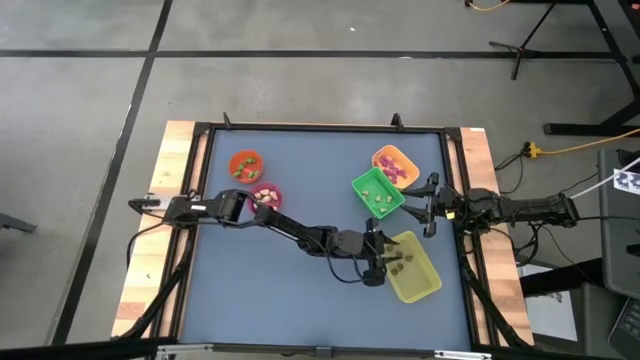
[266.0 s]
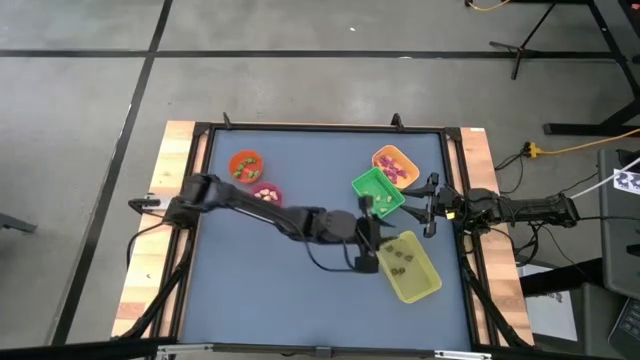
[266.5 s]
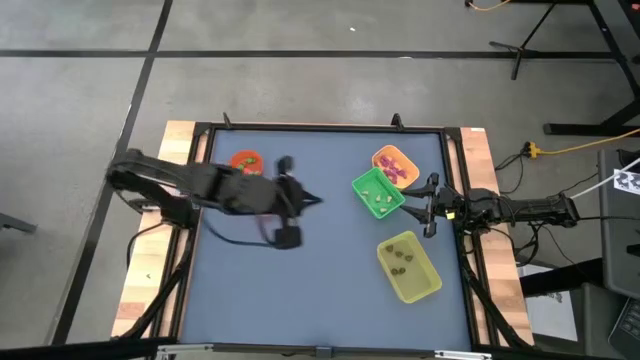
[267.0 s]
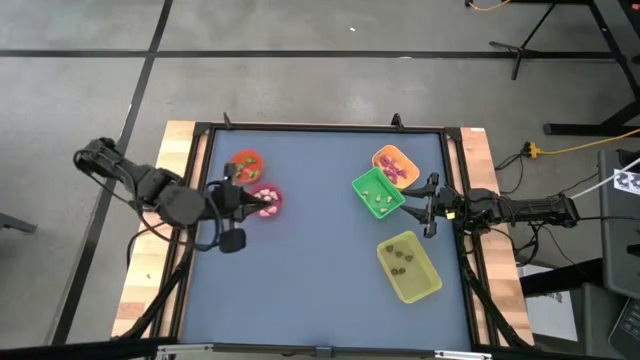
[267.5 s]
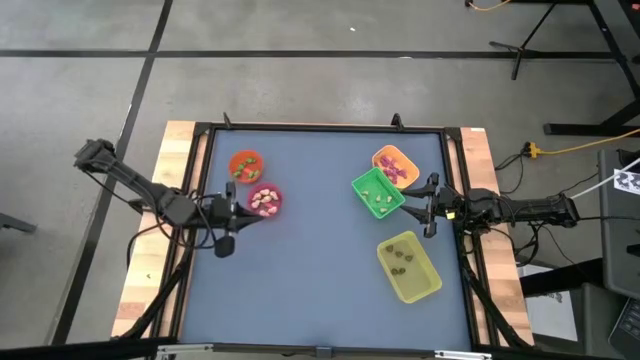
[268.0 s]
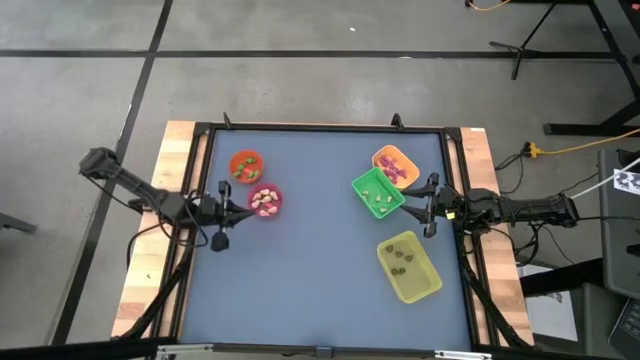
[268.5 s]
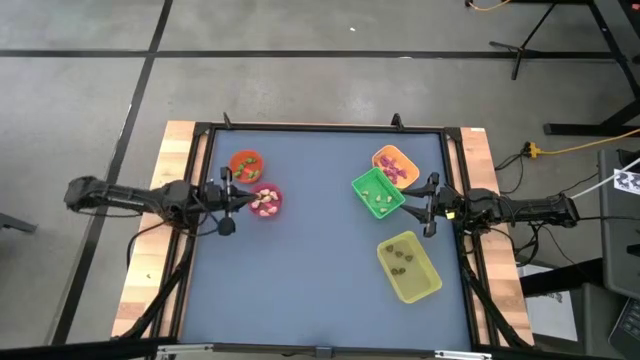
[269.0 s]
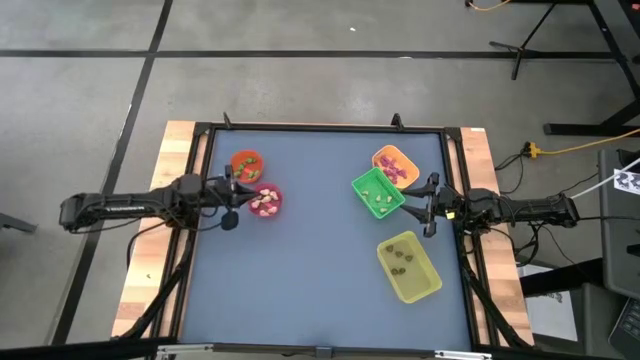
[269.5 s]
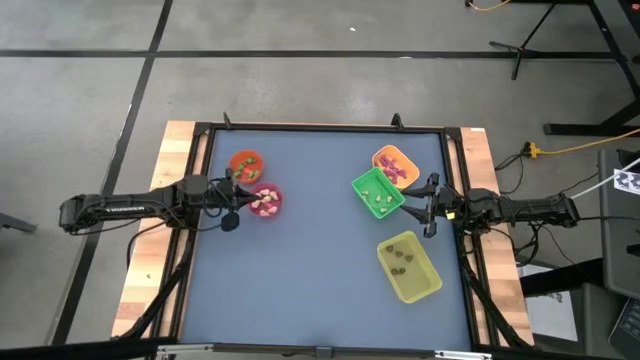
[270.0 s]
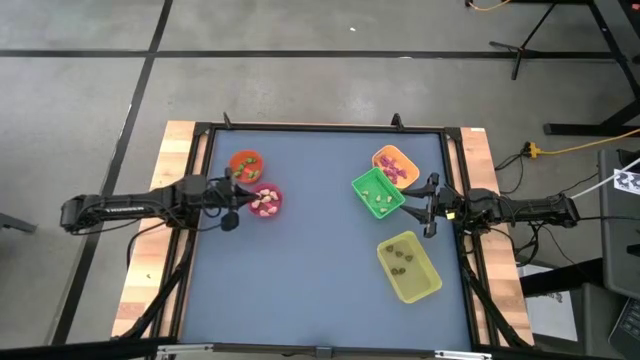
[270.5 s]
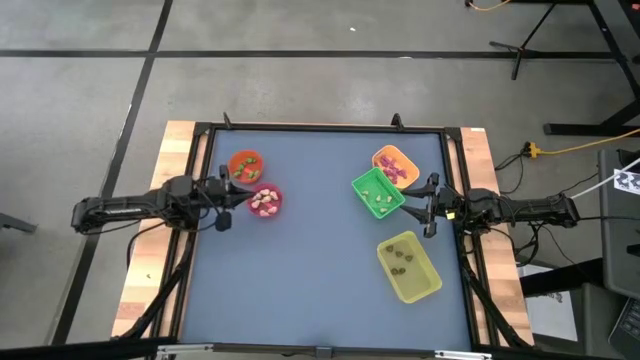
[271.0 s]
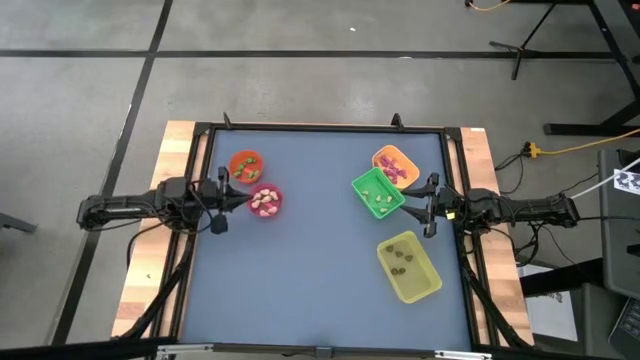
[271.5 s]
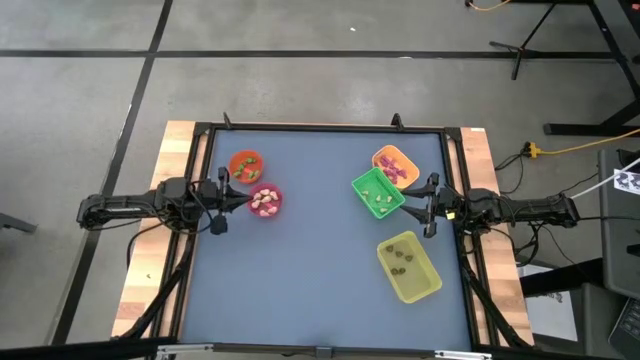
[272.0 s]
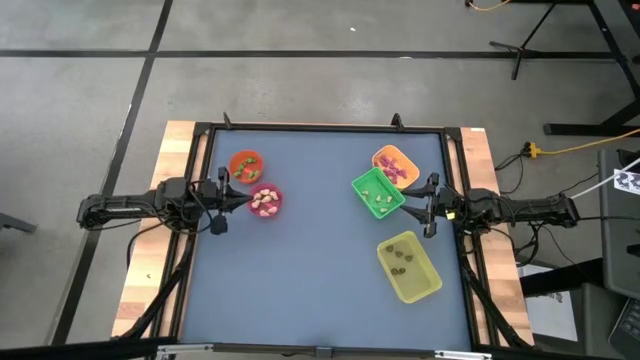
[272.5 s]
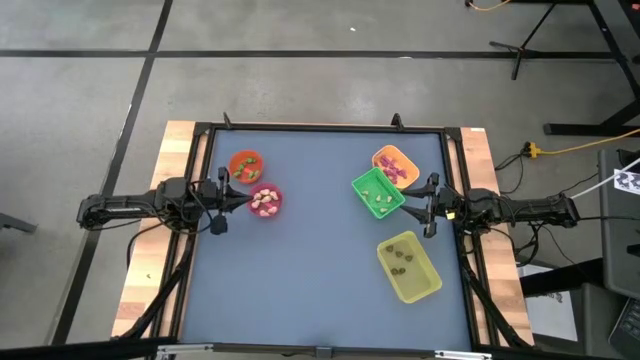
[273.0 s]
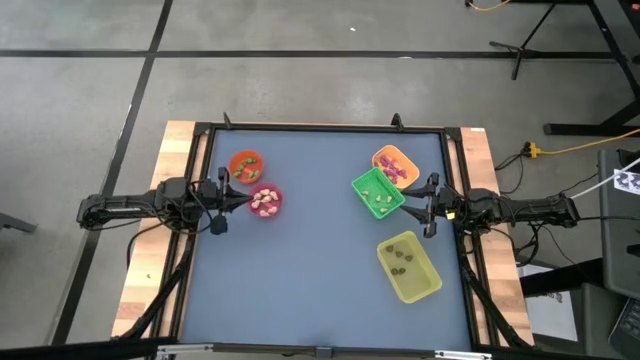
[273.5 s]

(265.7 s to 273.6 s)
Task: Sort Halloween decoration
Return to Home Position

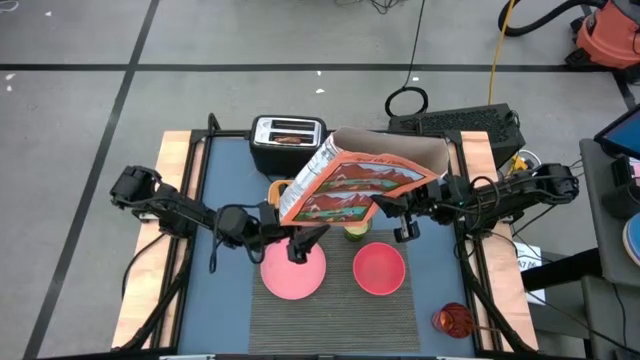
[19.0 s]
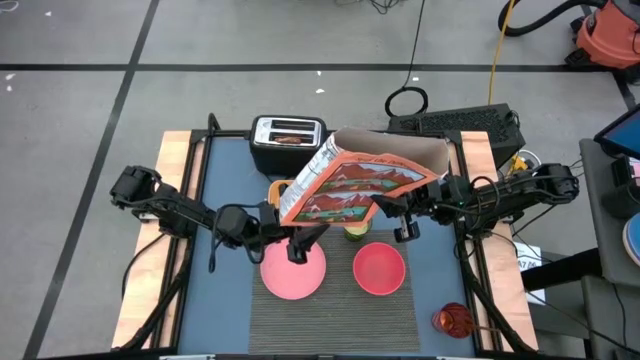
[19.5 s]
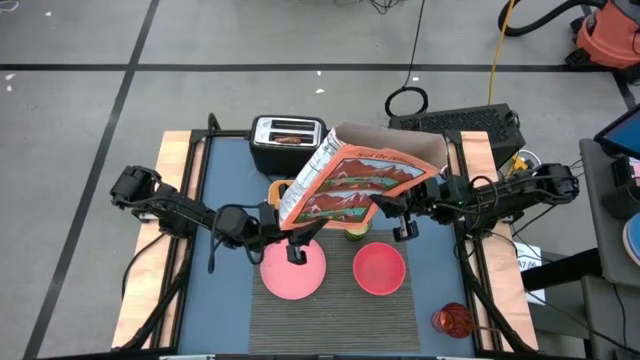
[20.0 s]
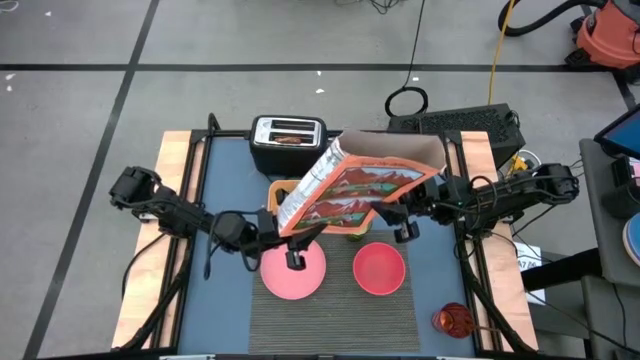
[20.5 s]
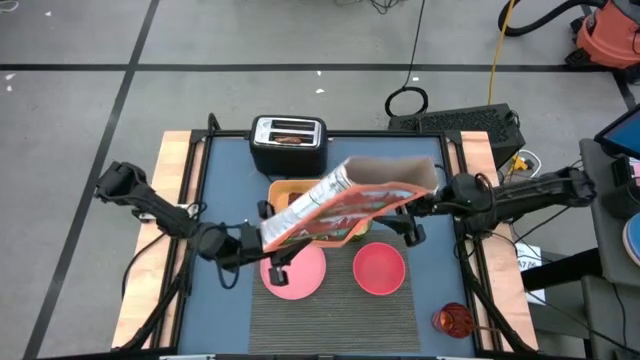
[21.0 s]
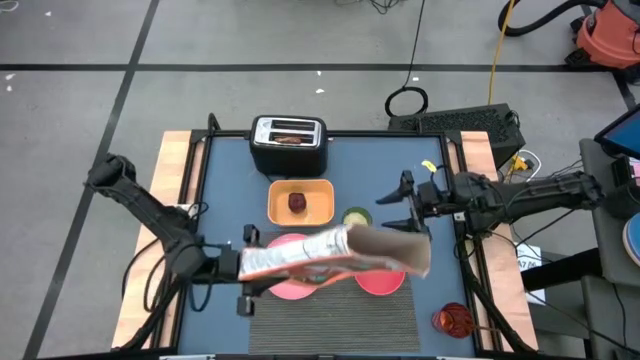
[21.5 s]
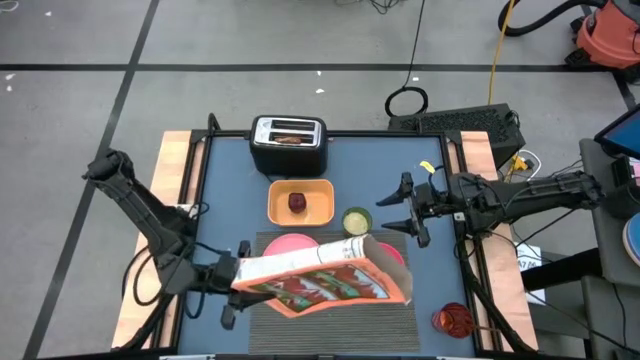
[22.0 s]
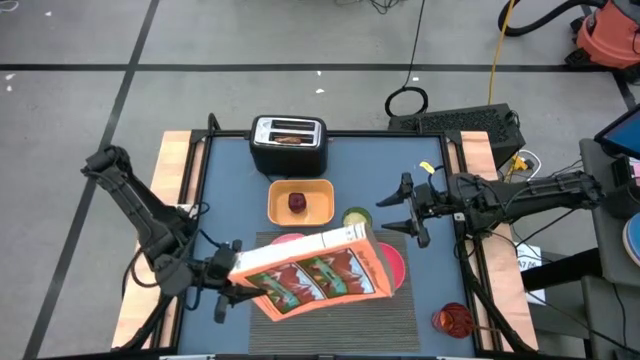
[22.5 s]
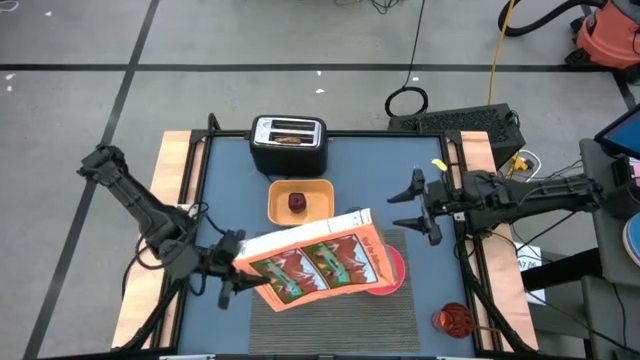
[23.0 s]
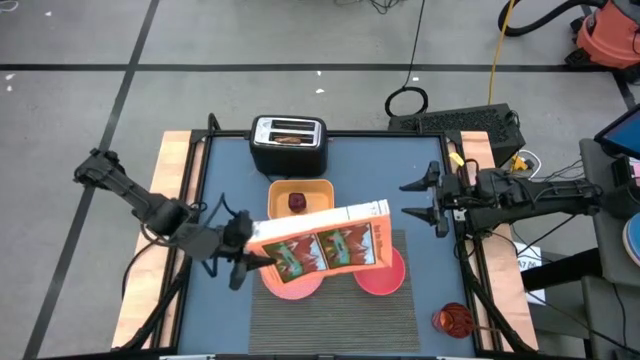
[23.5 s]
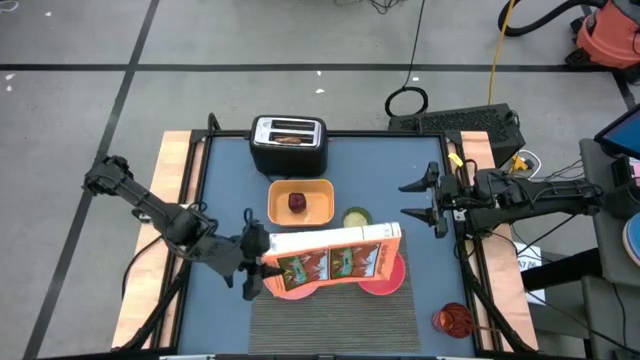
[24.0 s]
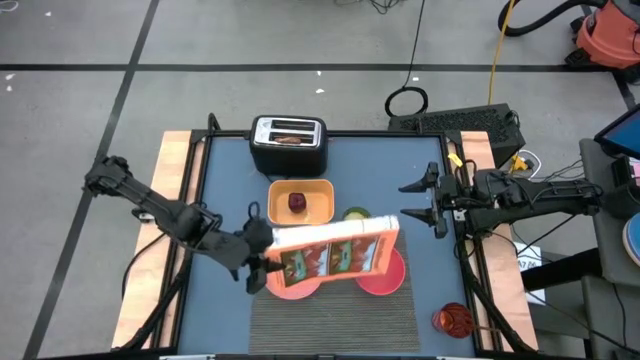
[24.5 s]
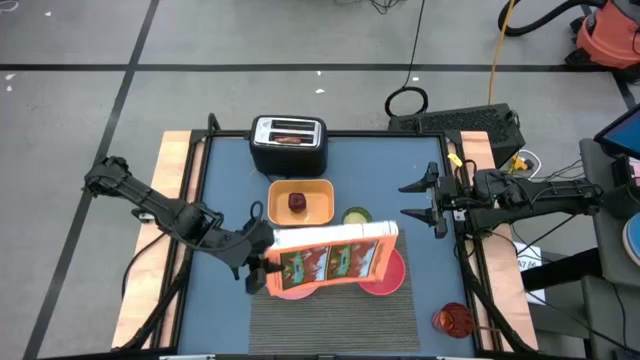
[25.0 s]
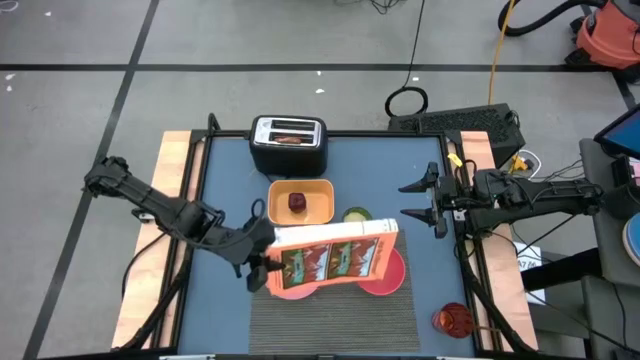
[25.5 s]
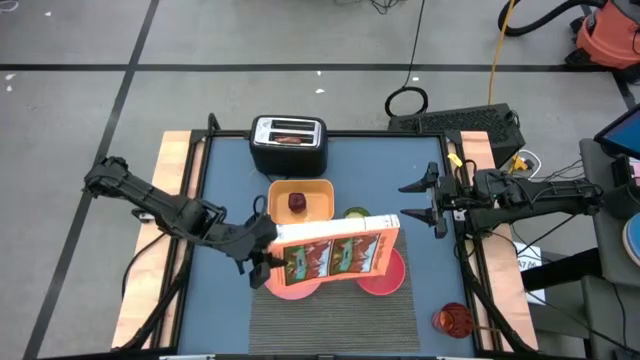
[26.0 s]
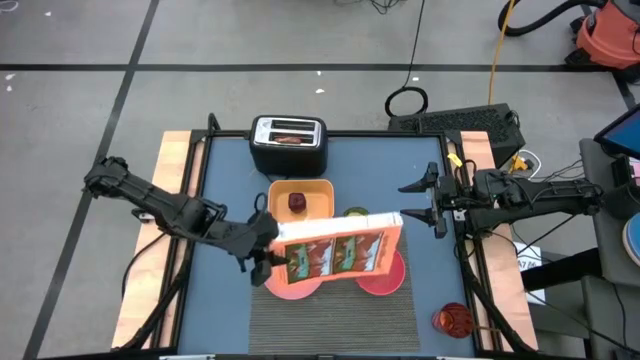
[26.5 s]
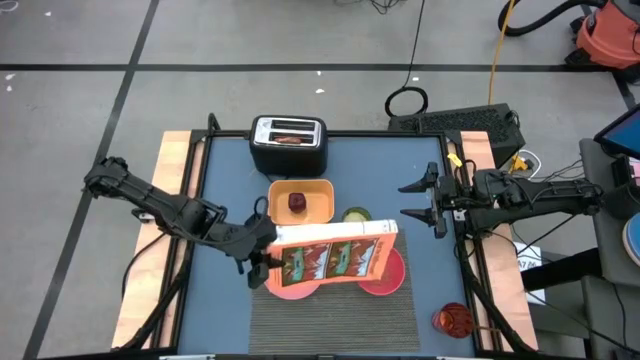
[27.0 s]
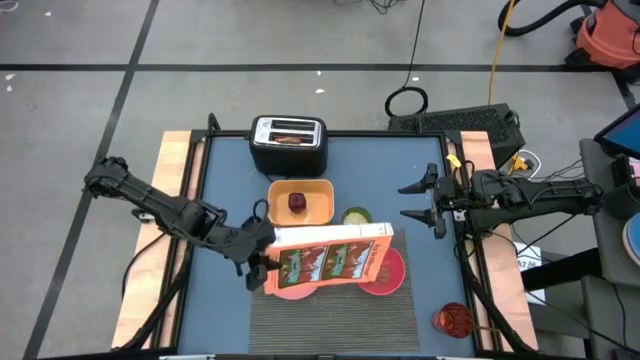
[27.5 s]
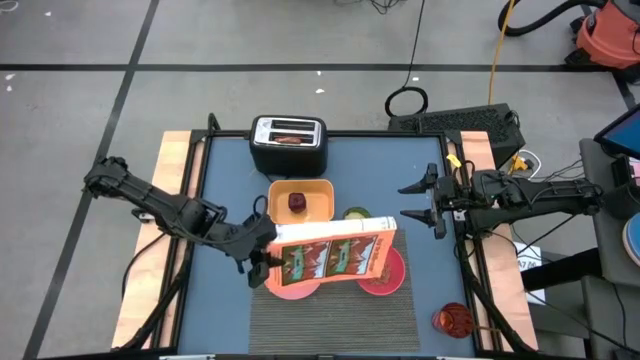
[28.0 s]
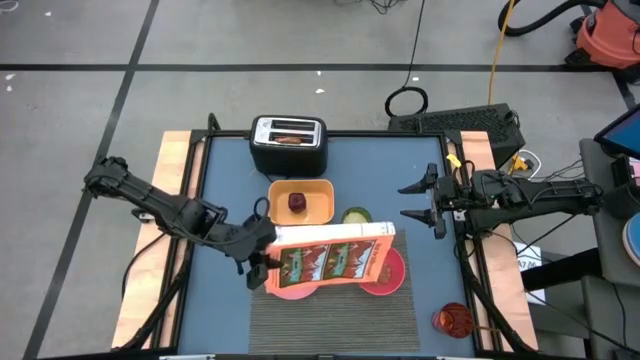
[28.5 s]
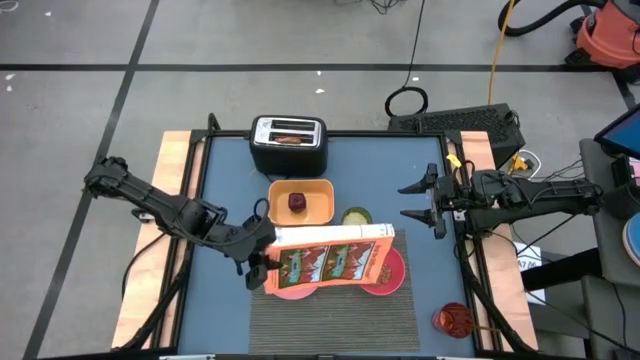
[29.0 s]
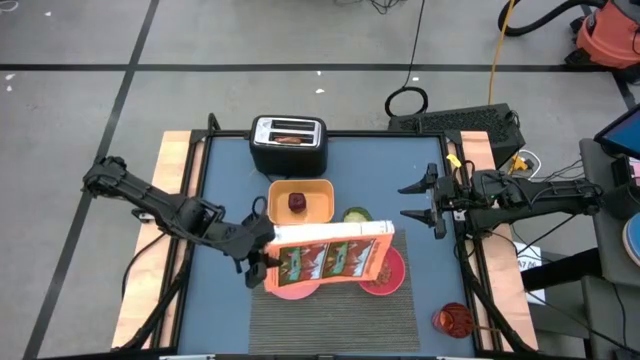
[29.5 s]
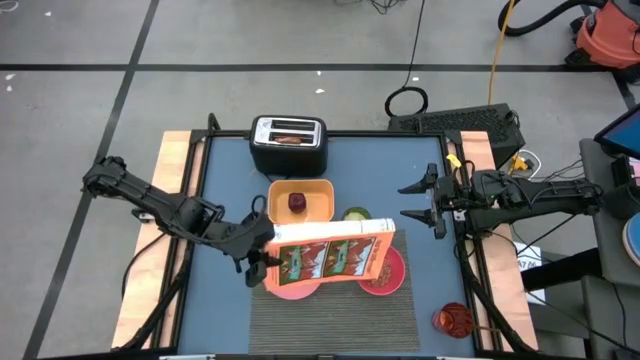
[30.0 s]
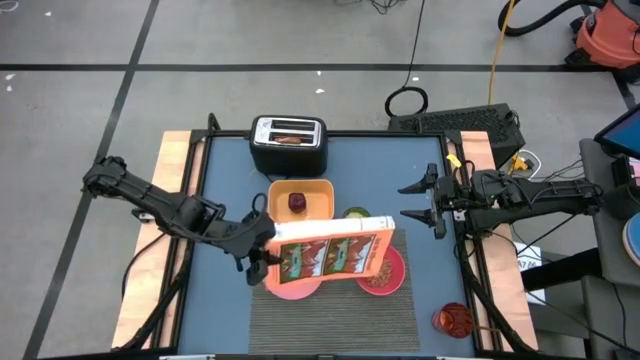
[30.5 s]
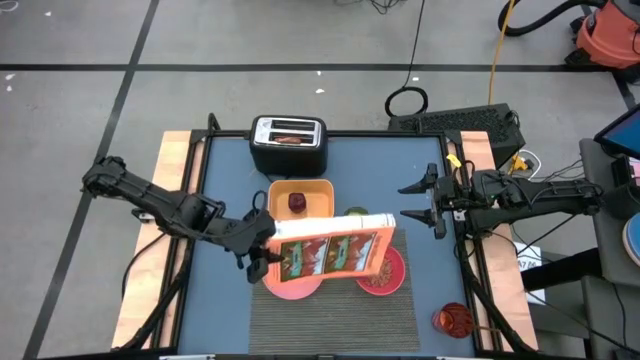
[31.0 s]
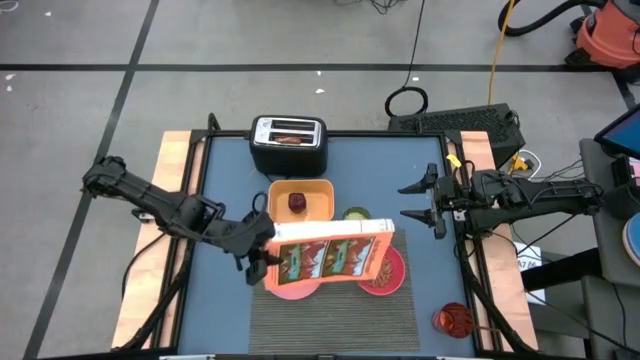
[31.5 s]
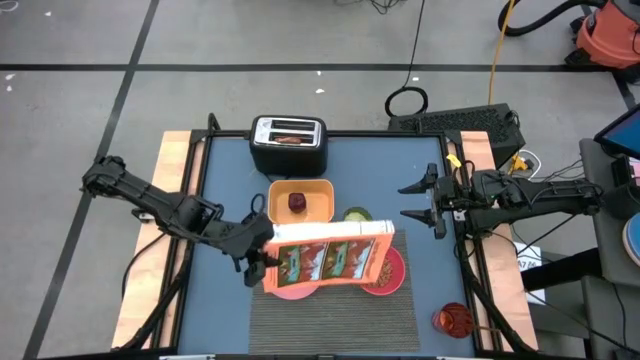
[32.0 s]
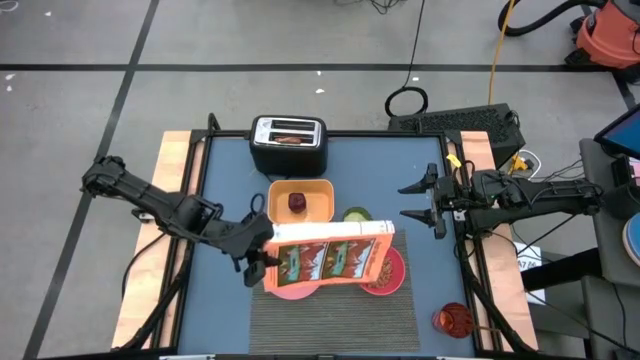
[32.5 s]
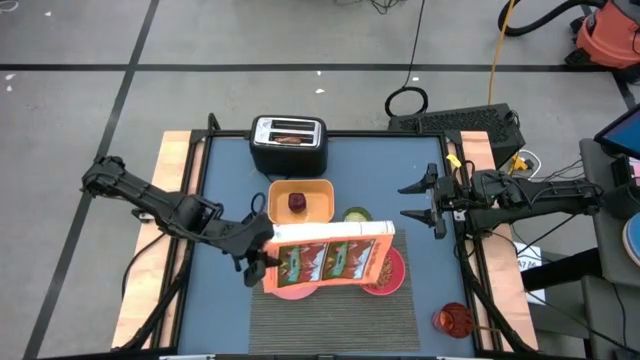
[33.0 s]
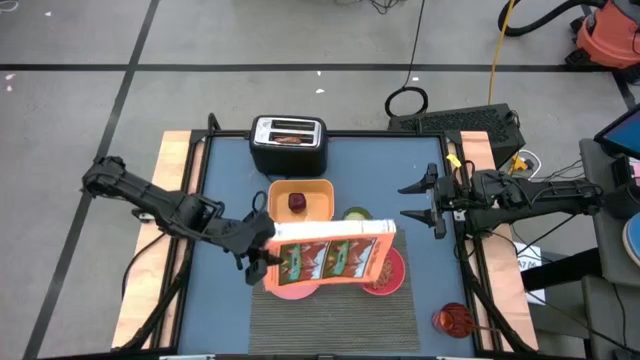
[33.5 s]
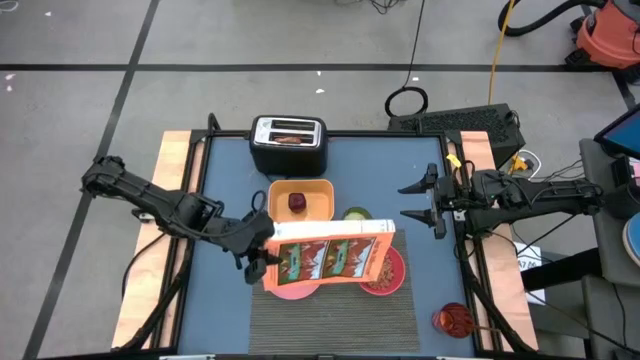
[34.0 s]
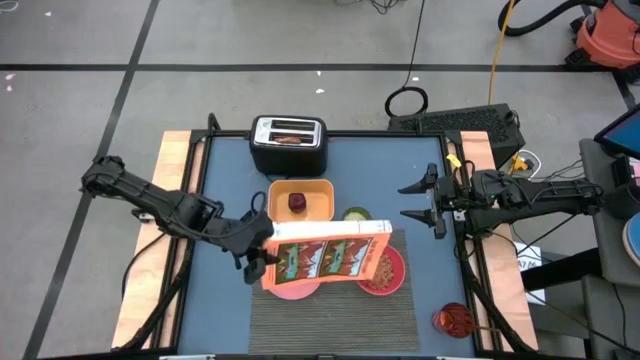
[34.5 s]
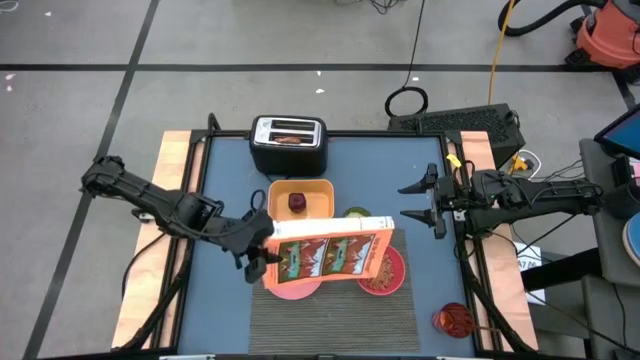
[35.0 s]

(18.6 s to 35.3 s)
Task: Arrange a breakfast setting
Pour the cereal from the orange cereal box into the pink bowl
